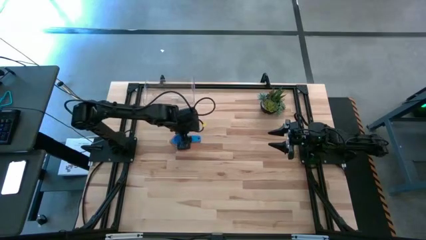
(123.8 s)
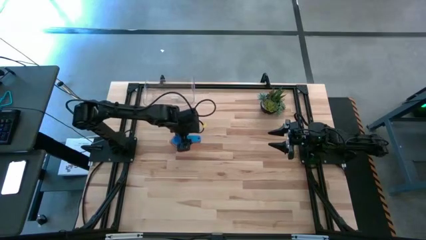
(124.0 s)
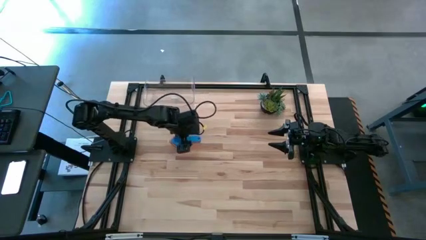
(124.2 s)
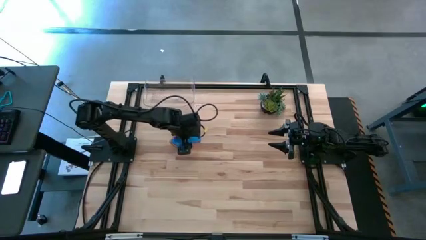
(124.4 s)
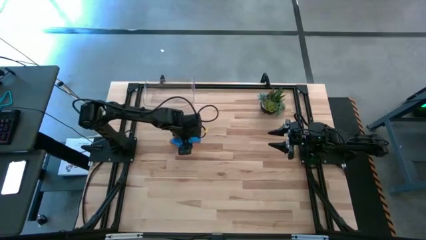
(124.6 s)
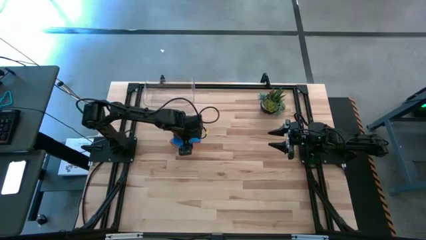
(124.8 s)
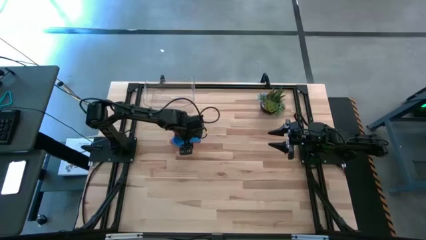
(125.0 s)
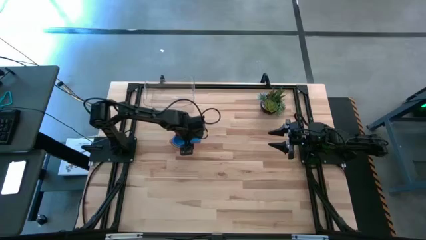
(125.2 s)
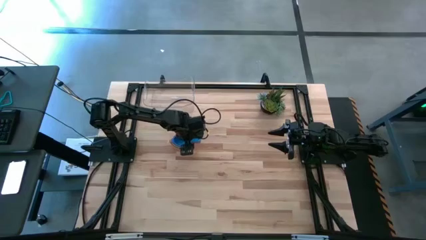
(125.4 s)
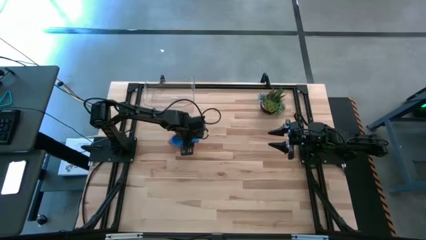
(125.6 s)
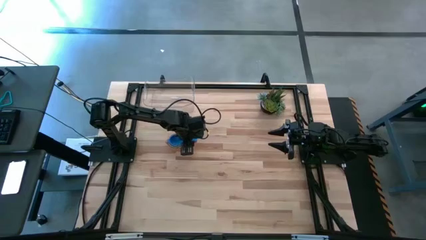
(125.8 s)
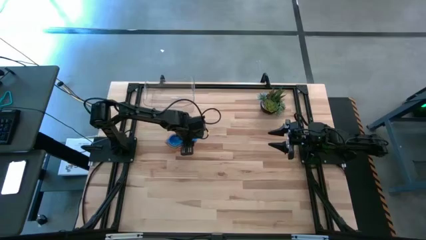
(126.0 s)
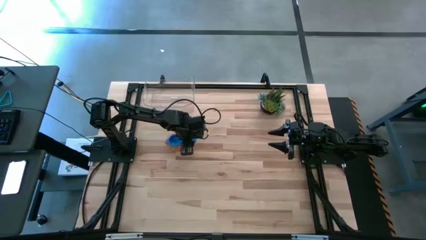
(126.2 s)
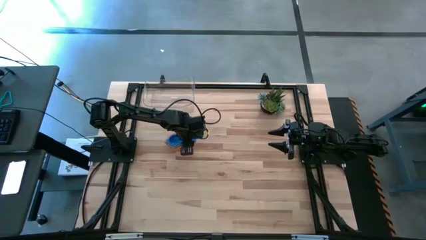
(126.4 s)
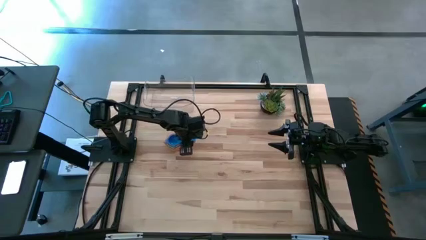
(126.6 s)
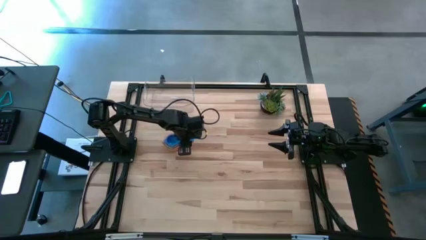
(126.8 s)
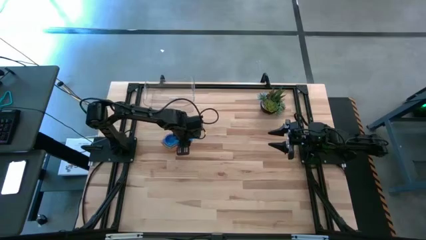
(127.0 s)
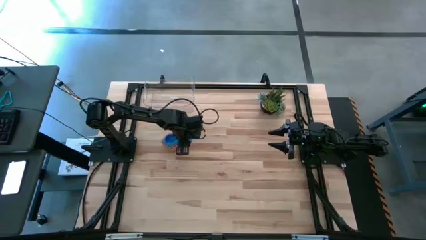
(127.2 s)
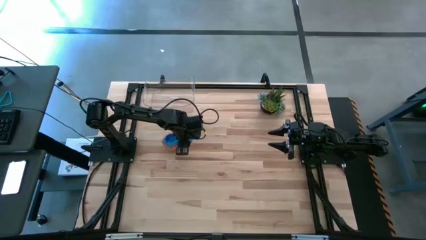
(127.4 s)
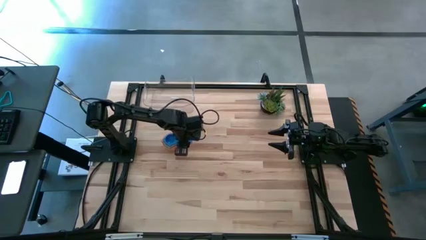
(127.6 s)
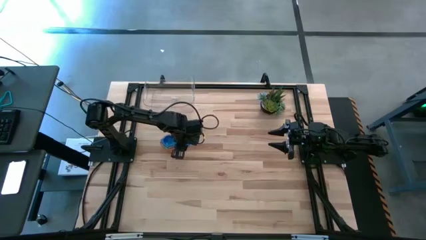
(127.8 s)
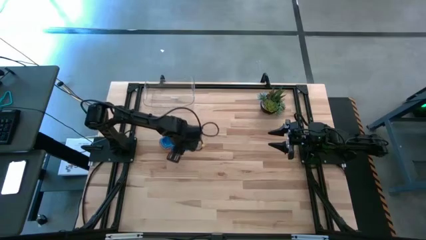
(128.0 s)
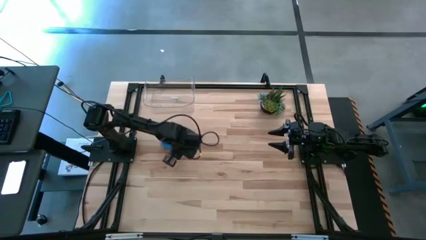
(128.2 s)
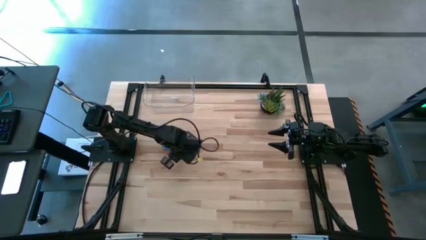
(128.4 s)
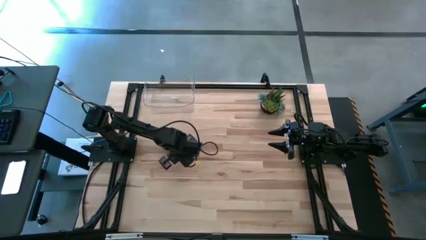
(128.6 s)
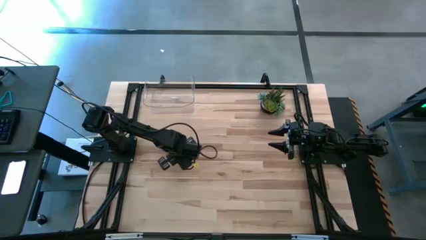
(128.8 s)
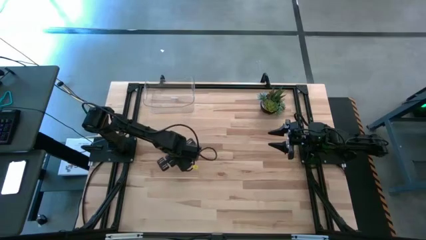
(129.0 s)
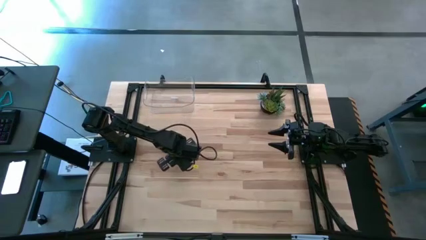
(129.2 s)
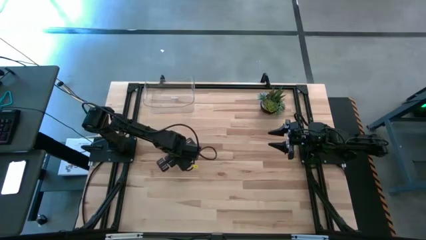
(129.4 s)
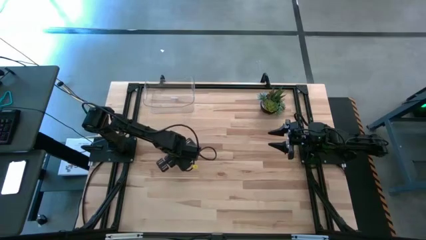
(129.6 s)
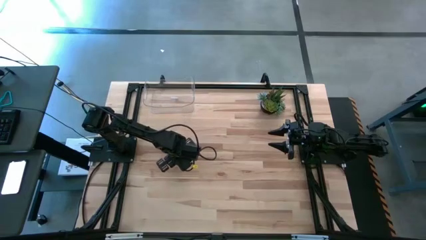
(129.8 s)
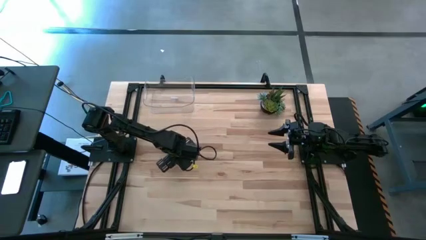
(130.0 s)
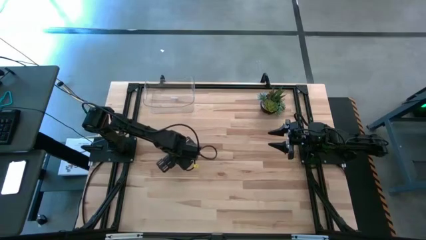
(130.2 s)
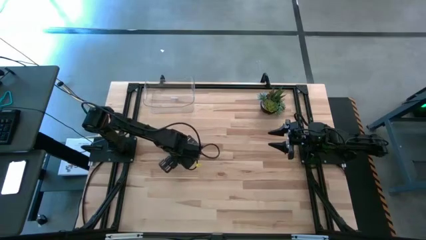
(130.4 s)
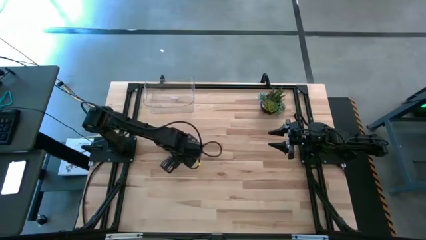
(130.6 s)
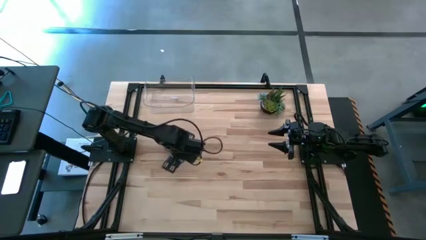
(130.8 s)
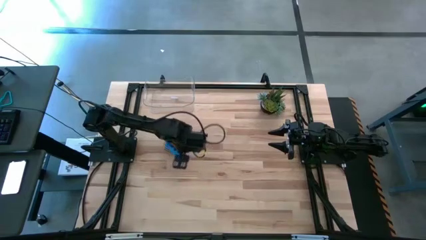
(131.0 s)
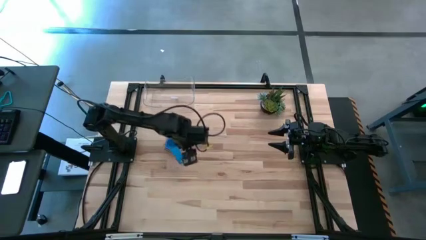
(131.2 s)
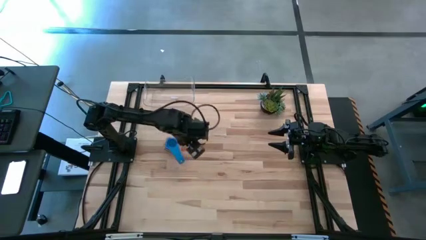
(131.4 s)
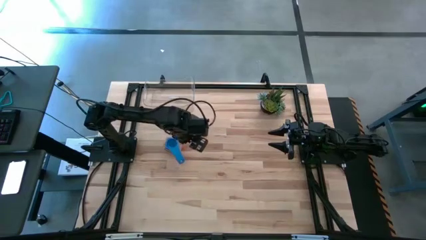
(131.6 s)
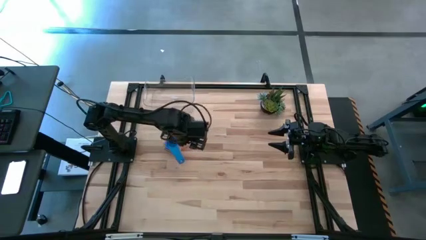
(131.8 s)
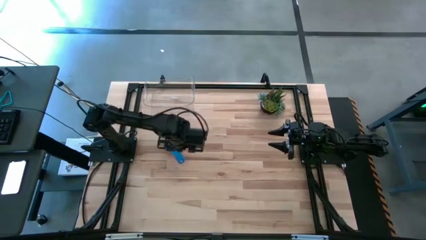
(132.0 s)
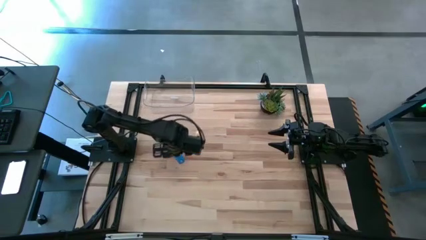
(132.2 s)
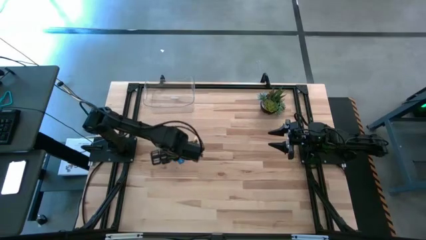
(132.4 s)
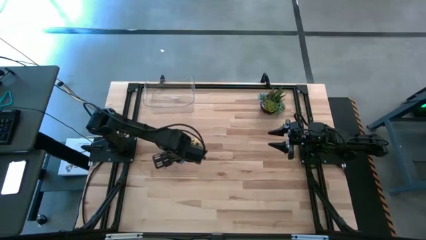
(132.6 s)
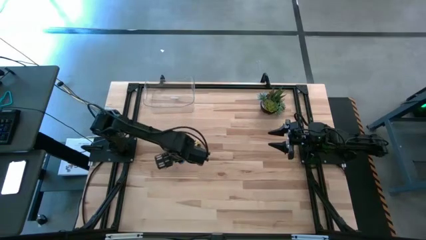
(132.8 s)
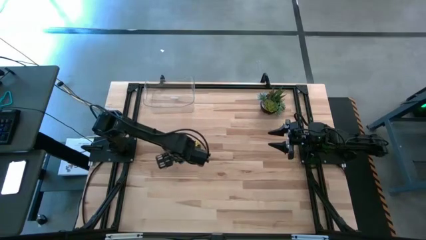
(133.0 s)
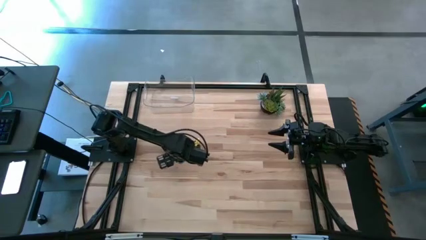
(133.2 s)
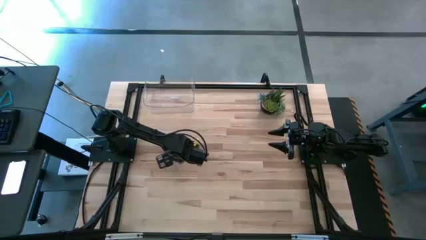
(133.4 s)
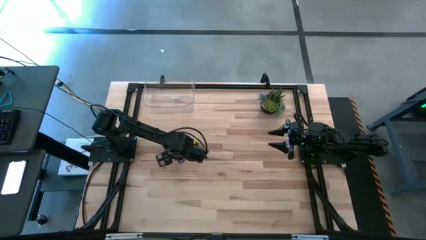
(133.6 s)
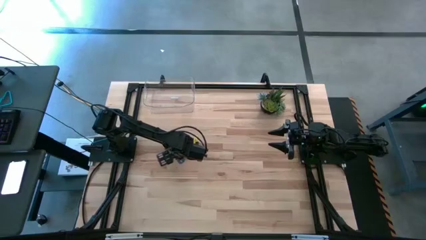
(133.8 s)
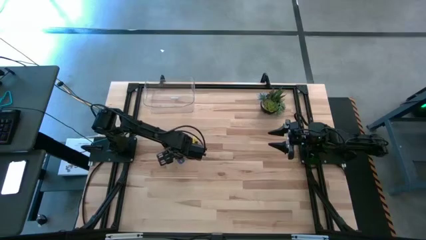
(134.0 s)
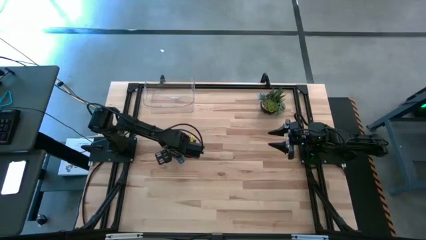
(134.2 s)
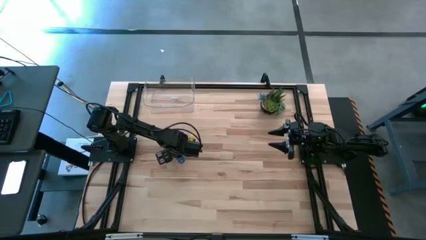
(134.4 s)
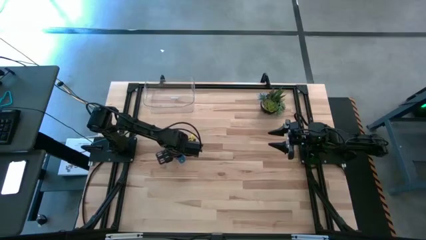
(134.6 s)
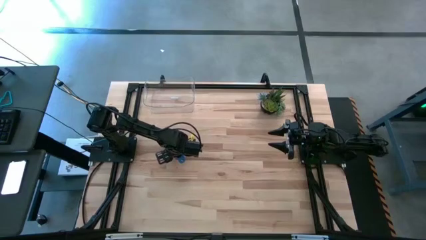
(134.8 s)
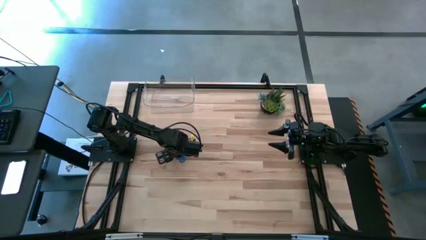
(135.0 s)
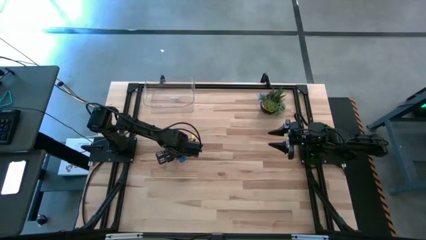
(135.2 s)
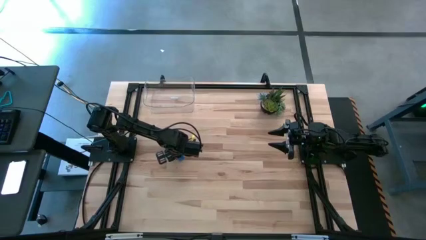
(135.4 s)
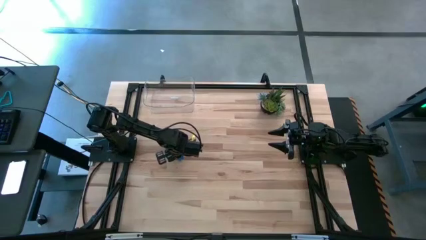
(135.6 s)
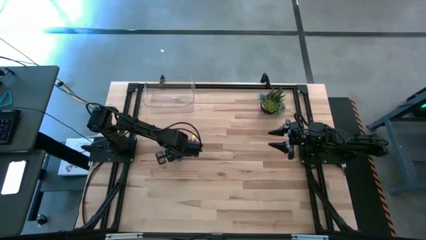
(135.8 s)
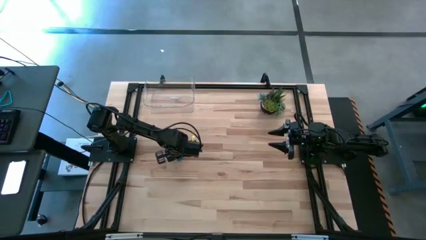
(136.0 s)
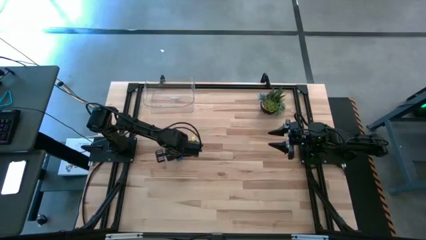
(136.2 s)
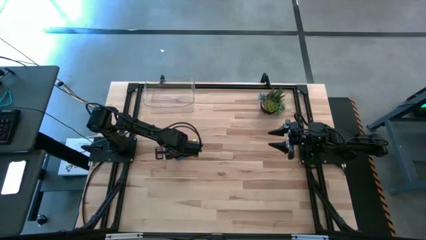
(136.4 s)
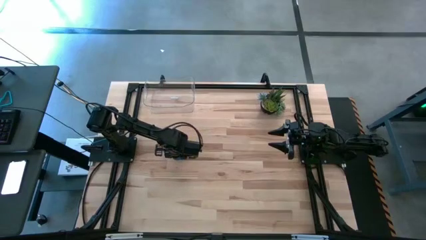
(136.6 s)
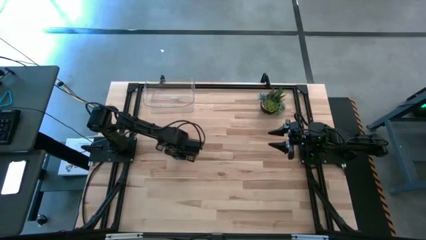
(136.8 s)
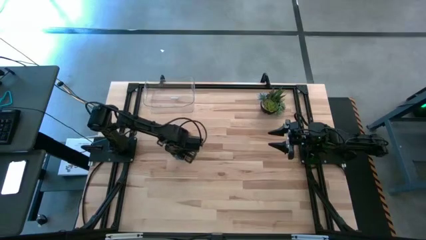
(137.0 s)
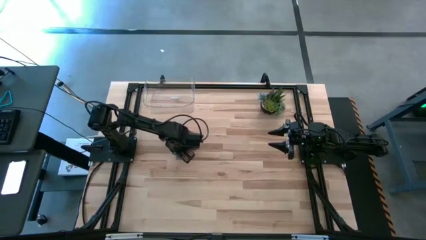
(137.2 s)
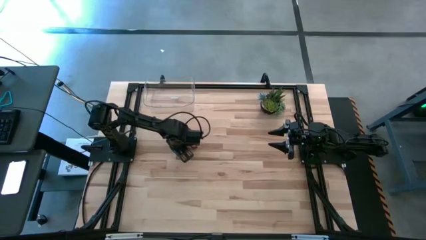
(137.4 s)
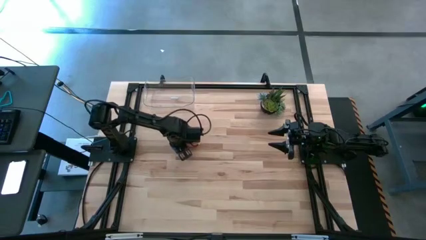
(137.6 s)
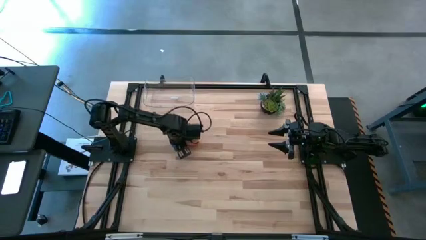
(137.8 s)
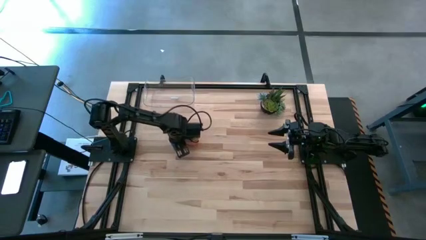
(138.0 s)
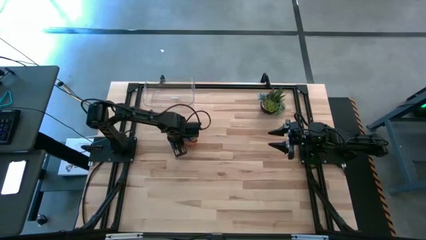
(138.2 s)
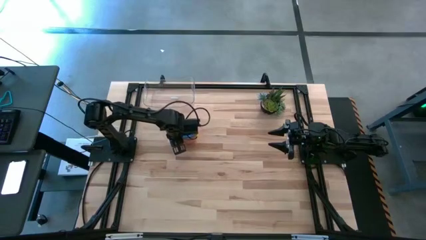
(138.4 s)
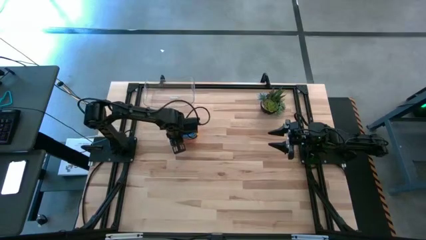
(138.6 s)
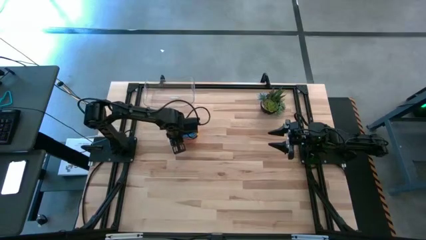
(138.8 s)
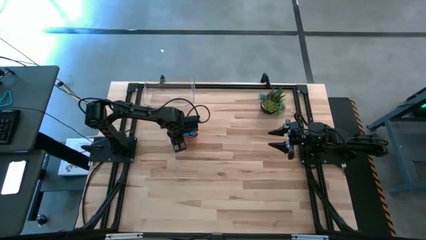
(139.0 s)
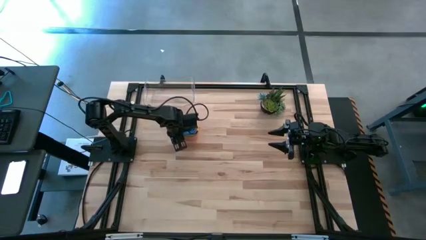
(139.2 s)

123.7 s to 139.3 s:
Task: Nest measuring cups in basket
Put the stacked colored measuring cups into the transparent bin
